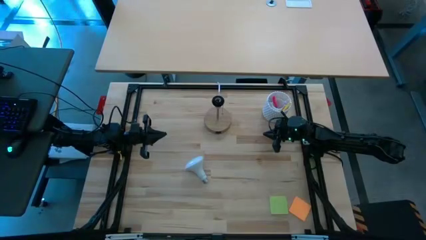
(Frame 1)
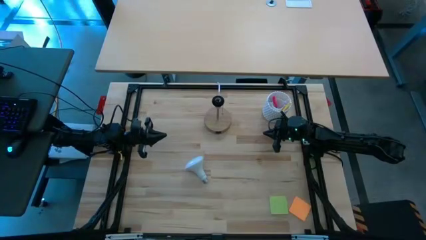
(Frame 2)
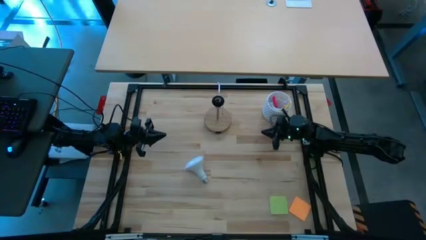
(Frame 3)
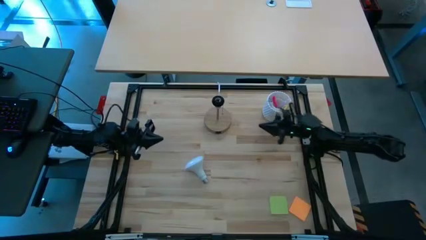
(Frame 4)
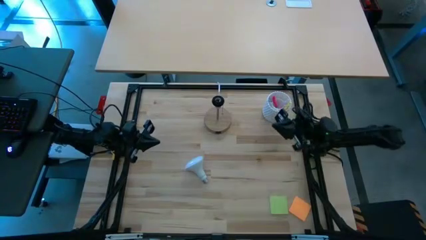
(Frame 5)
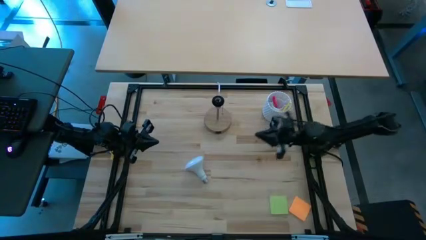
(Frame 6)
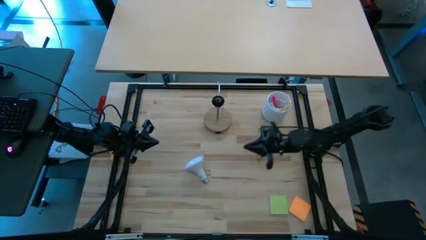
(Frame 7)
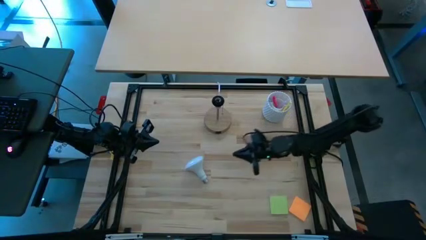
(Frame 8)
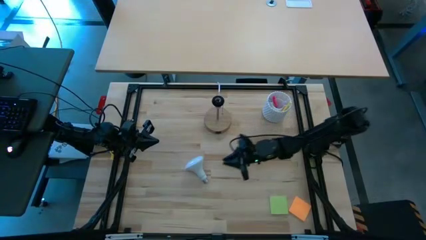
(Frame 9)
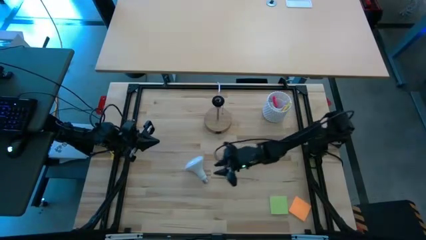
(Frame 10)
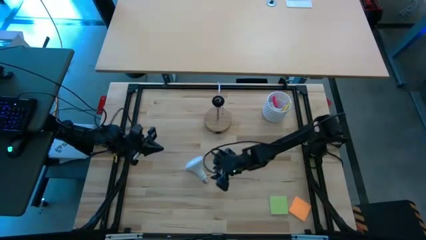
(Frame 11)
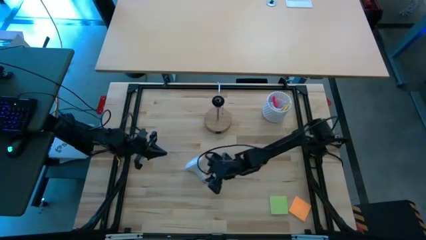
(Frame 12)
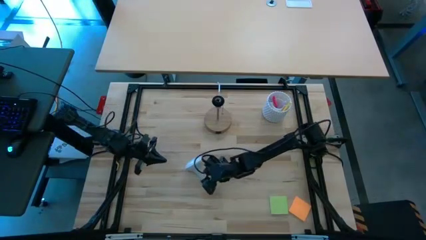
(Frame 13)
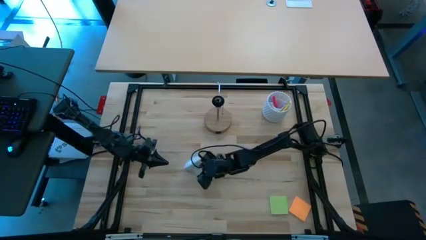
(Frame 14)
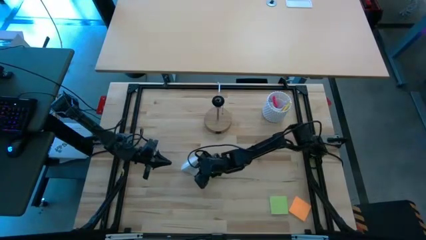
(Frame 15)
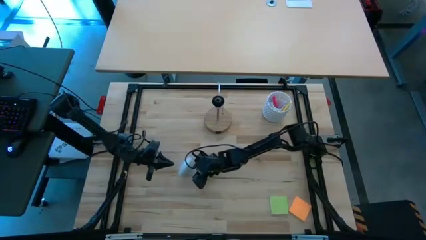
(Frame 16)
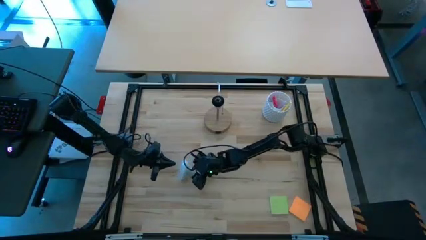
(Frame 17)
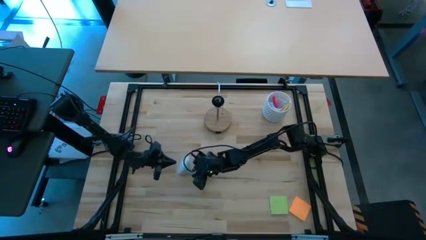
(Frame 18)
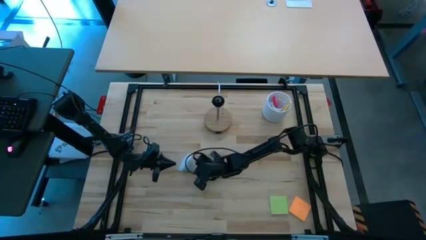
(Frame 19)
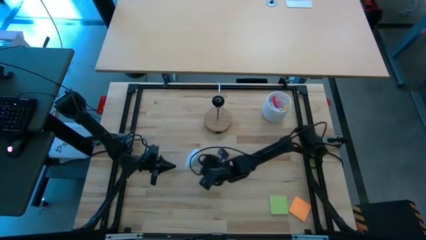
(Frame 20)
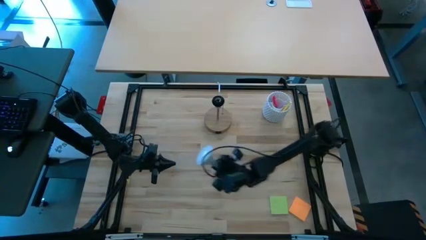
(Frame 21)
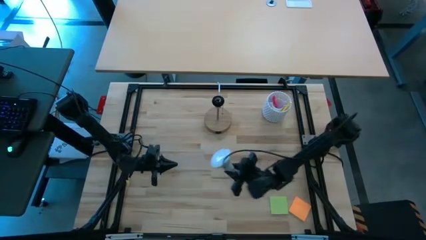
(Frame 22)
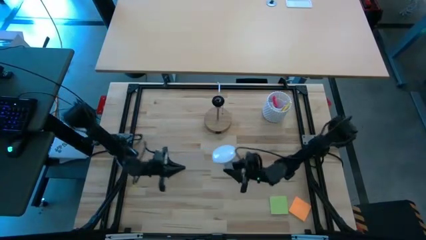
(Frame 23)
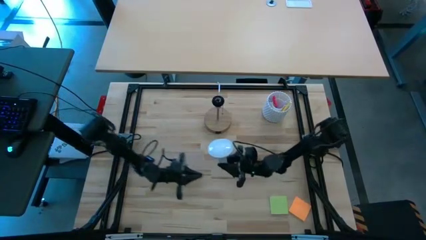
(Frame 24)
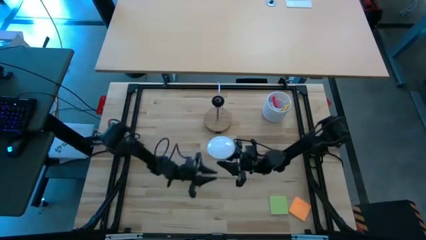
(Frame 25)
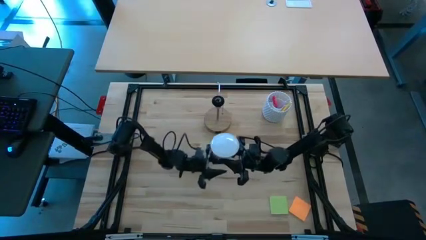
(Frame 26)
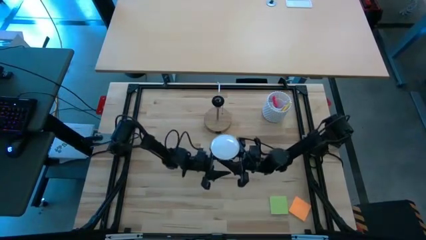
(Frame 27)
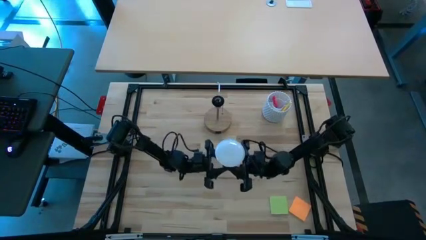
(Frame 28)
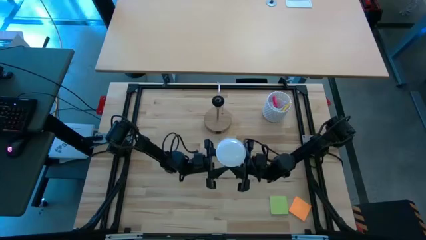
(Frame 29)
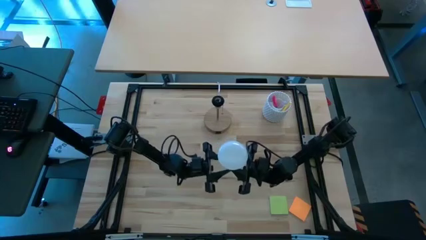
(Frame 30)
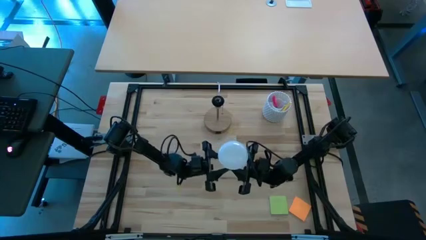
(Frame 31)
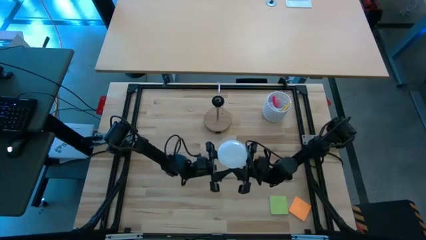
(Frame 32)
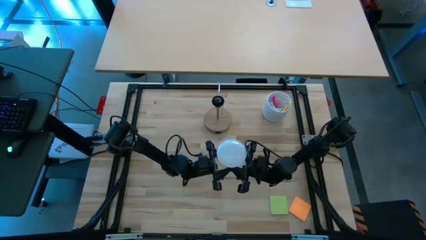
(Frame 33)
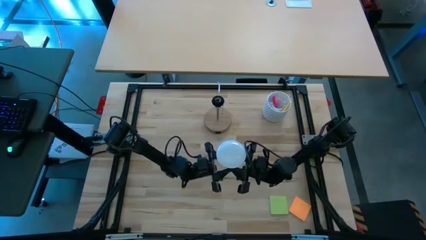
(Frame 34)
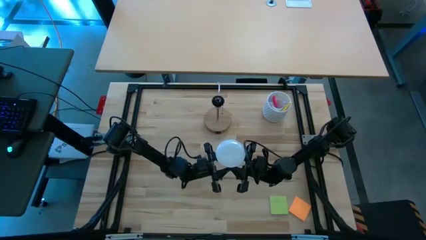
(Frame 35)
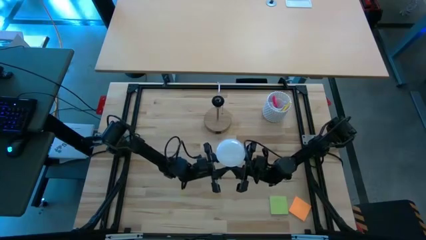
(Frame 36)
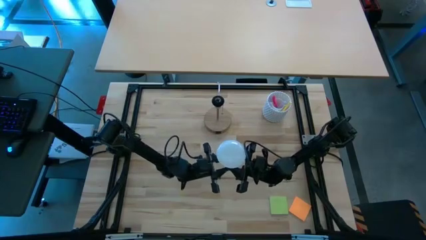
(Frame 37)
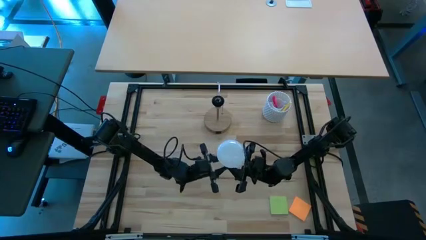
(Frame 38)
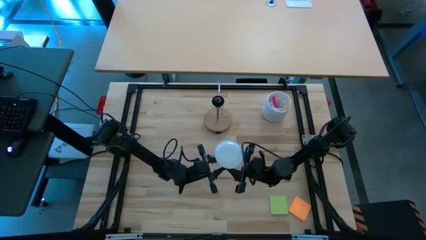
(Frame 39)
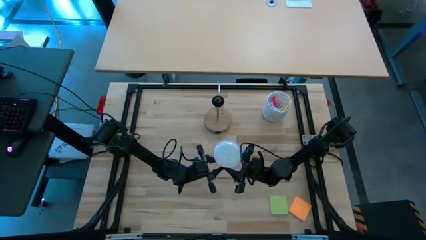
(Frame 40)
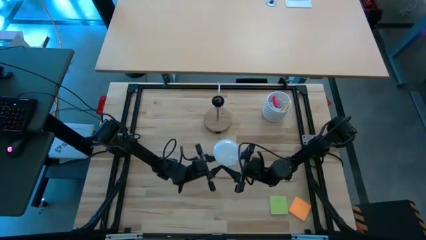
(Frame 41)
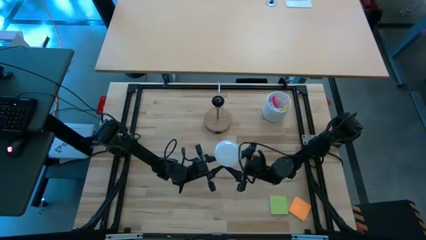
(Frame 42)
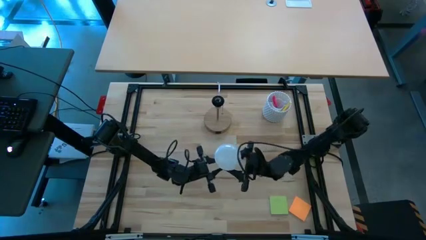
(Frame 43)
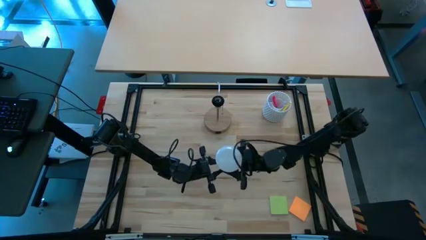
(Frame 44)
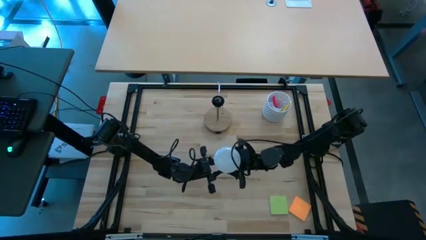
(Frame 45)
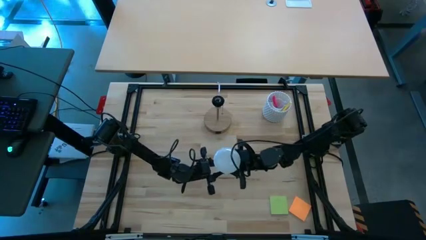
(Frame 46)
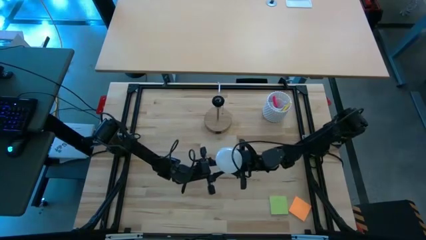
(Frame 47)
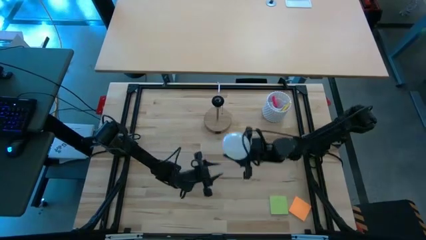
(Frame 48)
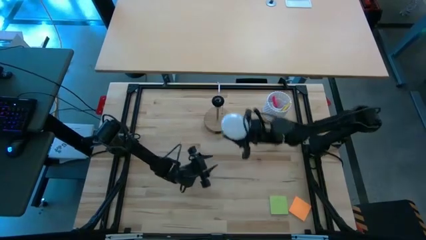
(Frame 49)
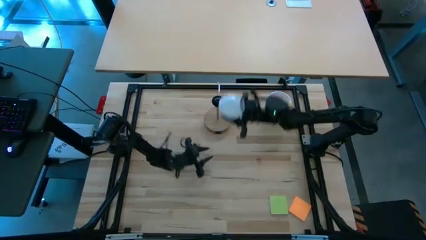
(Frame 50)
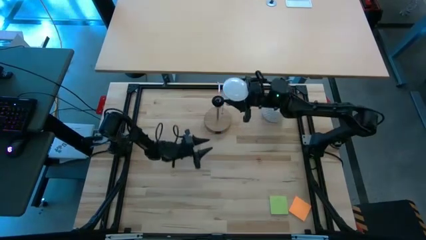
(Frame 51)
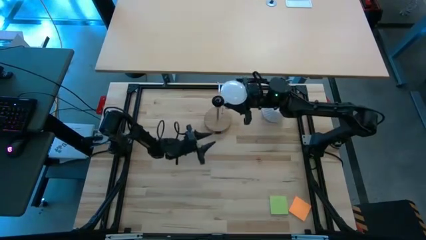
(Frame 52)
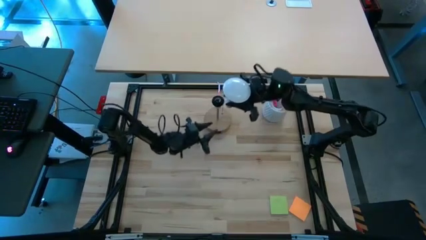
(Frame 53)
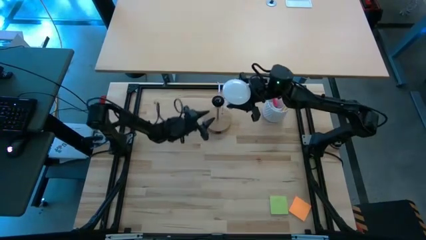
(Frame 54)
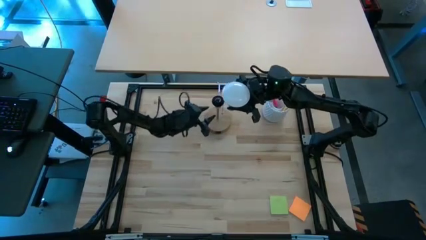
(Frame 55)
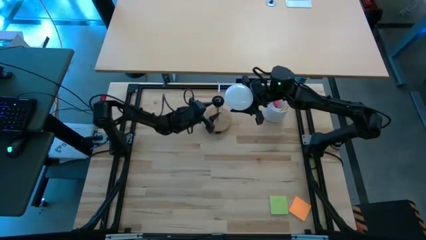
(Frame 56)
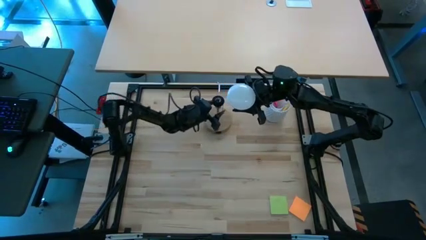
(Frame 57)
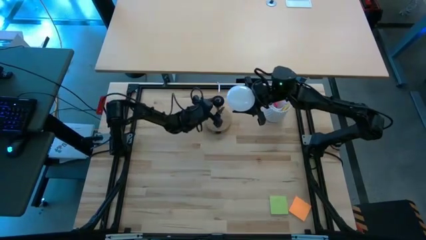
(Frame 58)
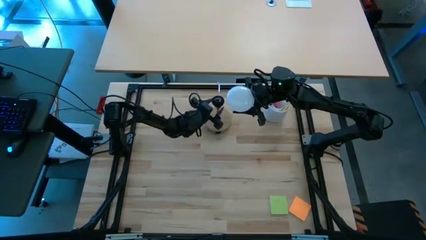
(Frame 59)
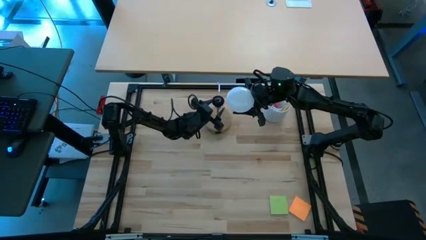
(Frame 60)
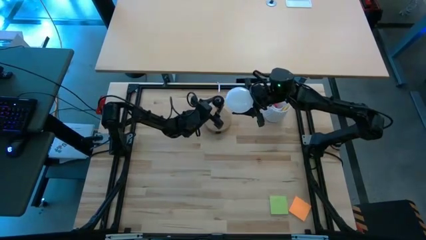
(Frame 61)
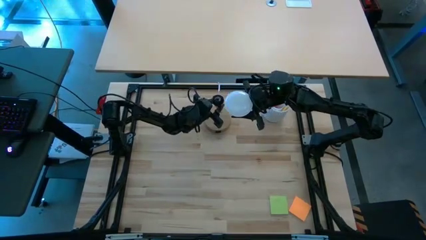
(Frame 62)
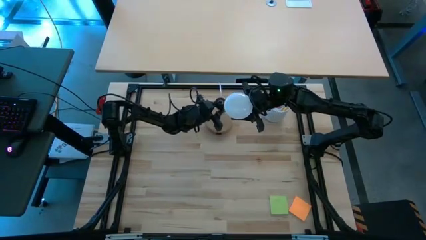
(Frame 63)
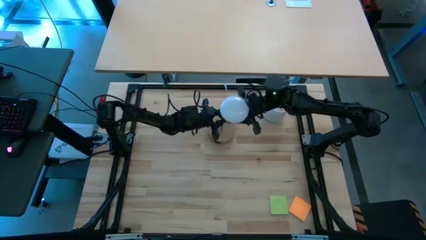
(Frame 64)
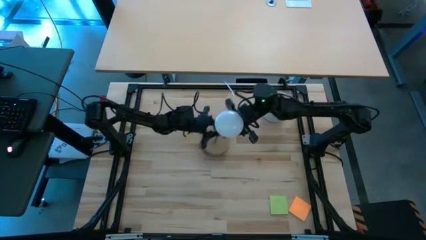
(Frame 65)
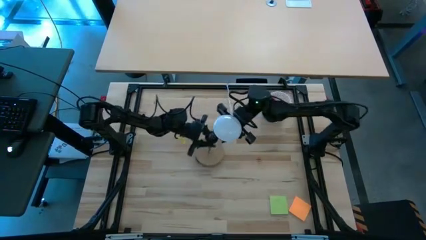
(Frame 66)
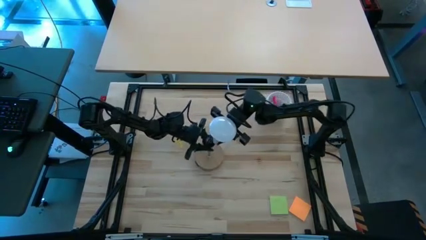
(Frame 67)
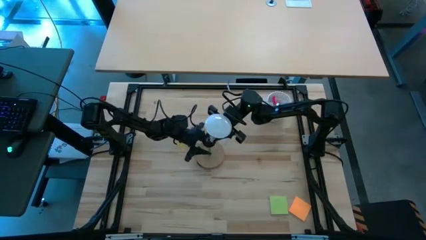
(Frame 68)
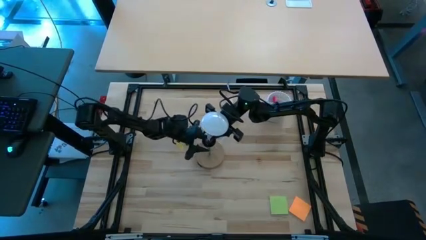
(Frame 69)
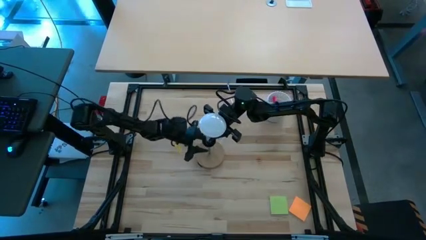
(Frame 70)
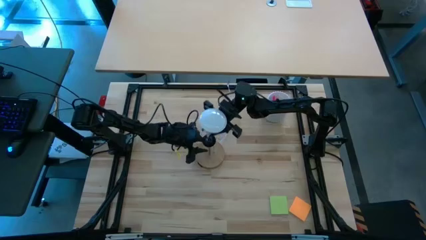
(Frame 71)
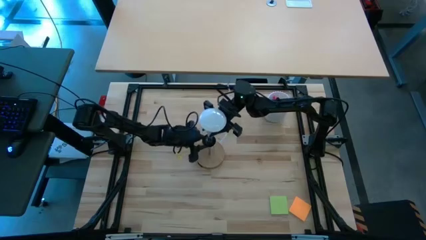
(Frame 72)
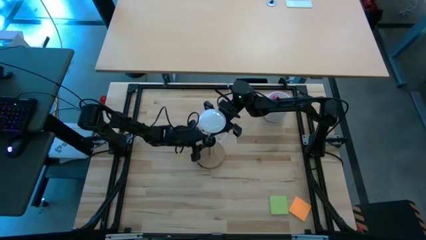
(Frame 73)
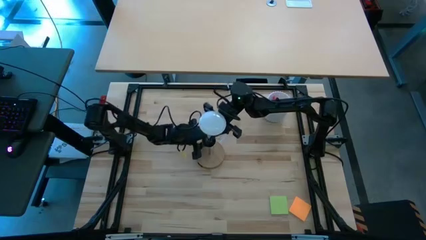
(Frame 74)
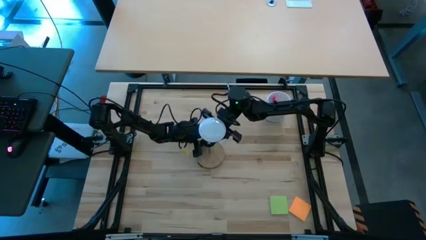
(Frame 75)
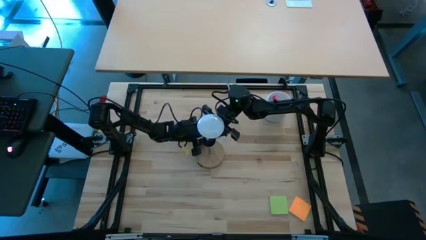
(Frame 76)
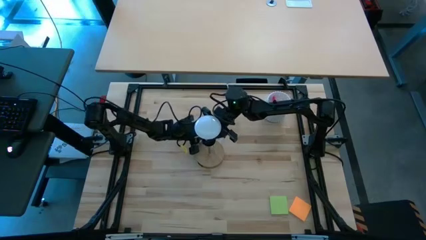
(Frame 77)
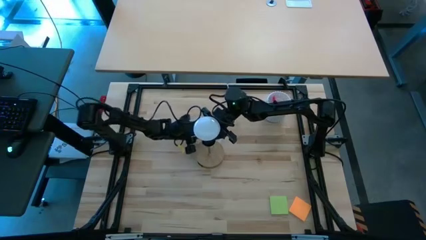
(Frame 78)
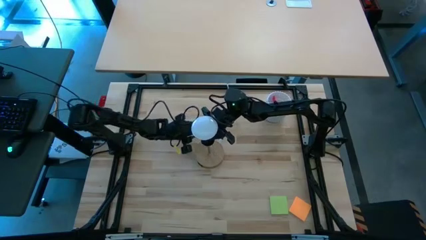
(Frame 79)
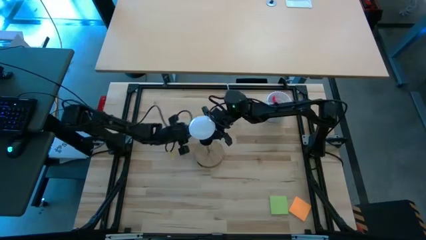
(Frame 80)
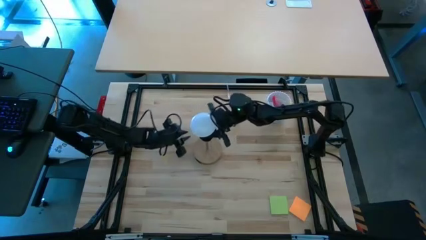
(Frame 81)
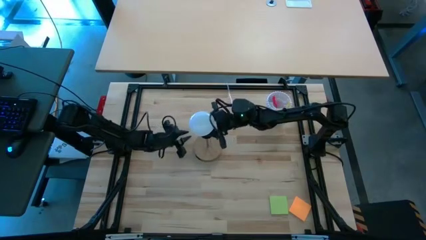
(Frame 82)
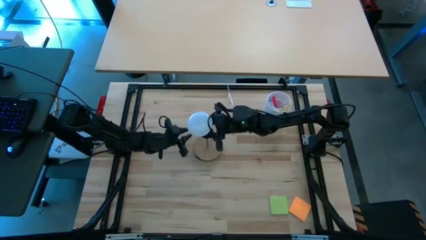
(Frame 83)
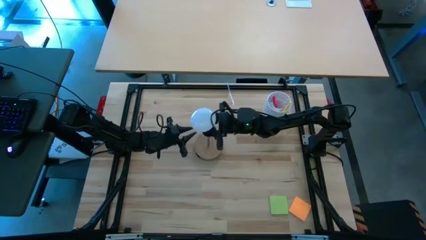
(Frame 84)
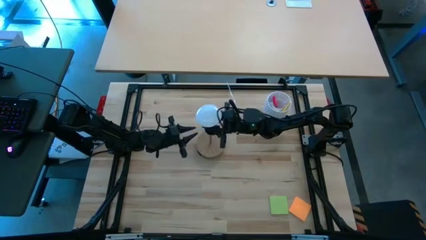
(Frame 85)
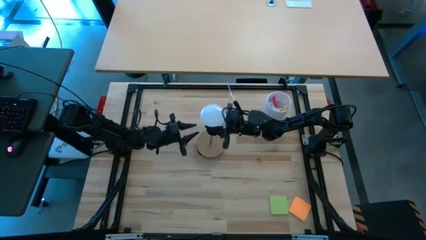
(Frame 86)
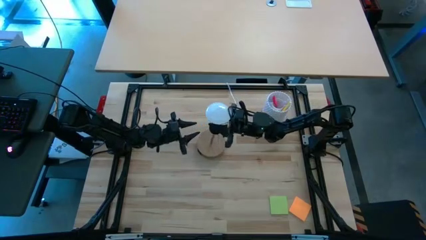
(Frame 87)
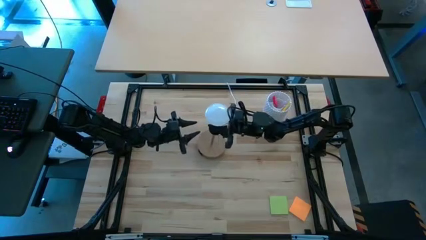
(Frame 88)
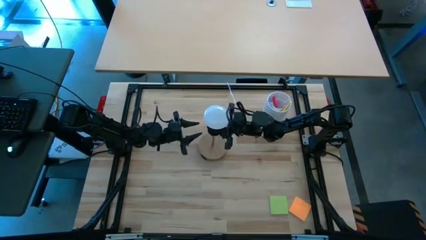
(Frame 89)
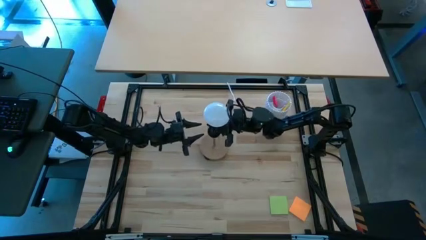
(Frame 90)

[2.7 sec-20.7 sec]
Task: Screw lightbulb
Insert the white lightbulb into the desk lamp
